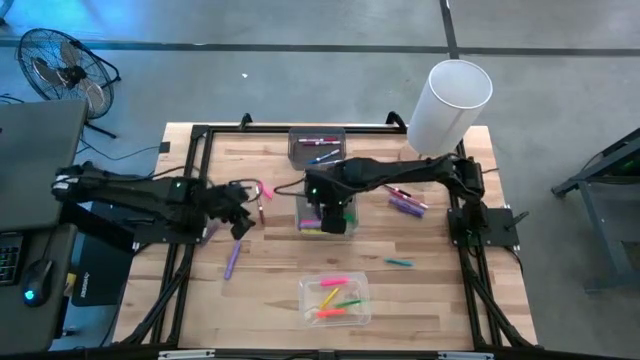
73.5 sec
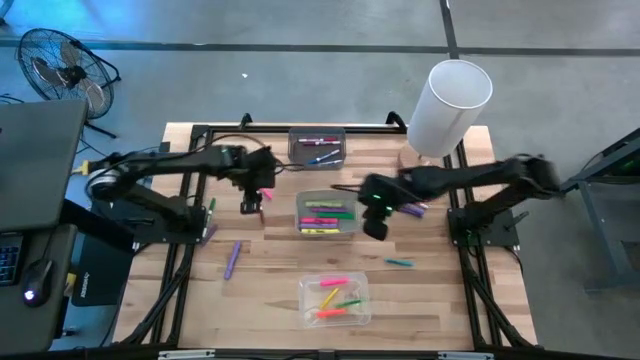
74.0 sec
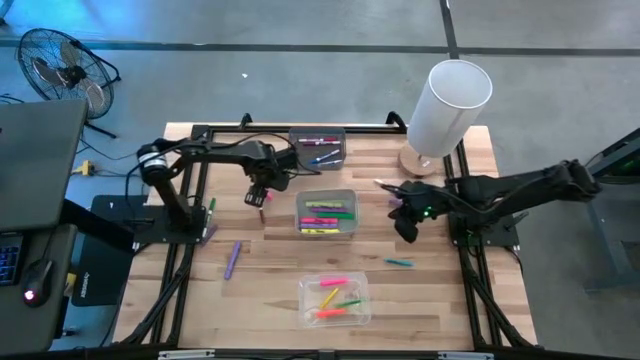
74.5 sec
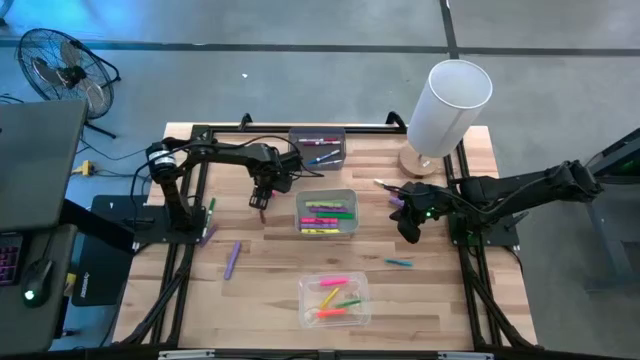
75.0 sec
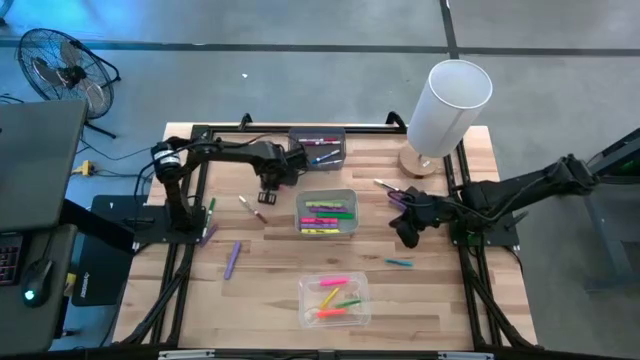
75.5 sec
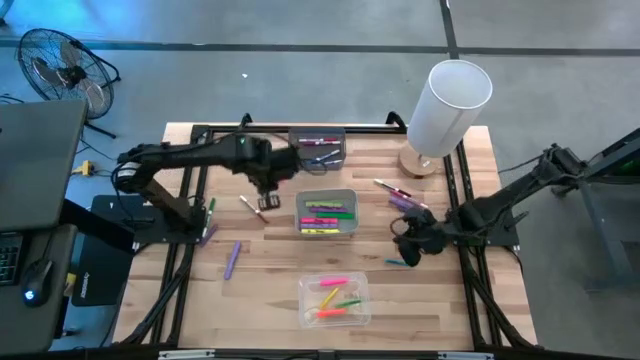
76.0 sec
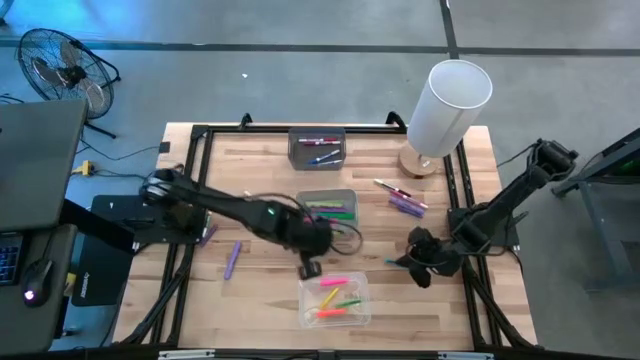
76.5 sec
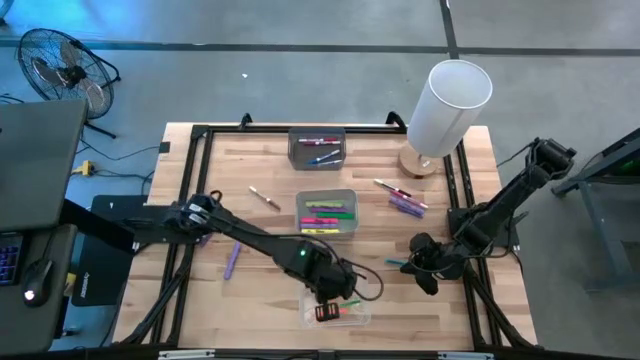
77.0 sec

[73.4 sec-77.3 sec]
Task: Pick & Place Markers
Put the pink pen into the transparent bin

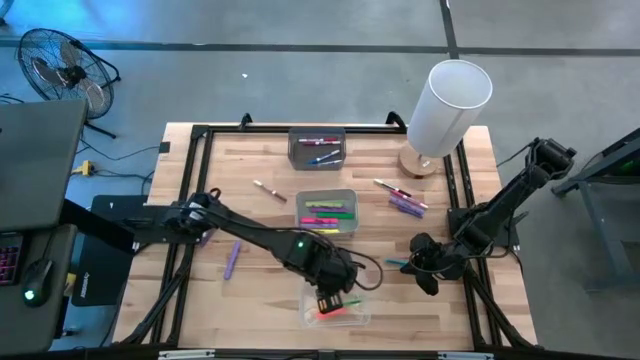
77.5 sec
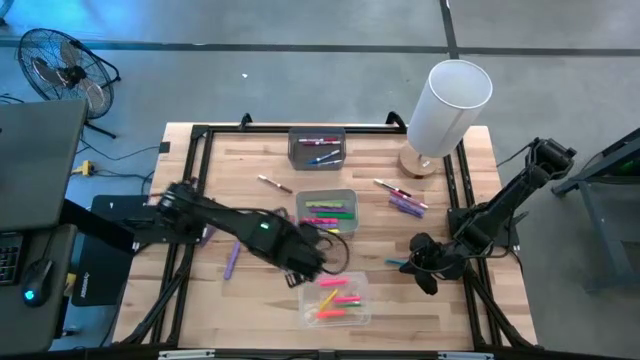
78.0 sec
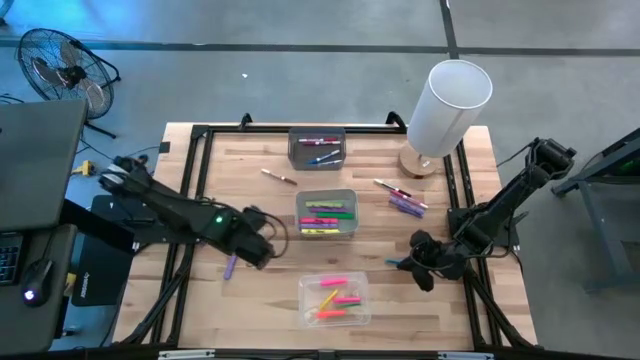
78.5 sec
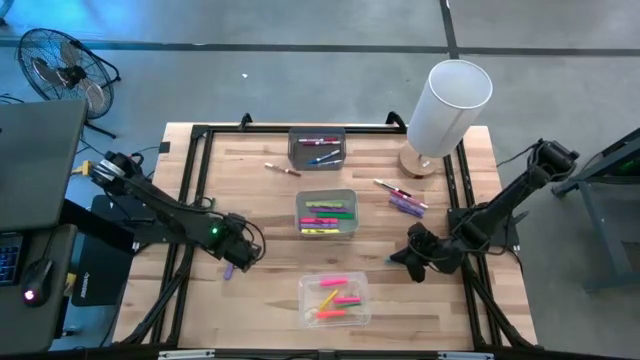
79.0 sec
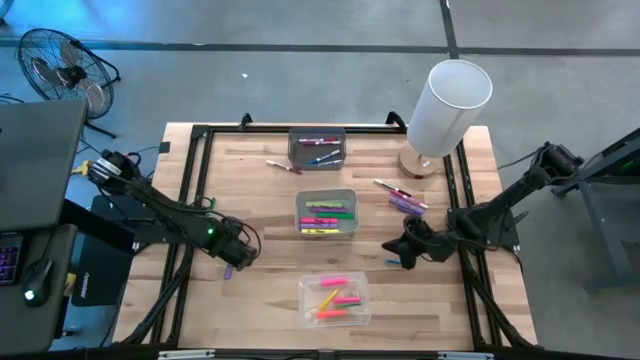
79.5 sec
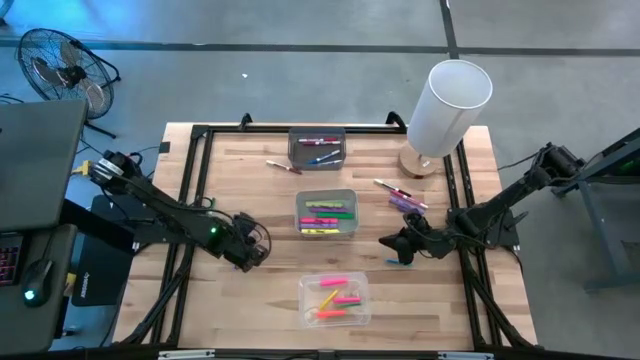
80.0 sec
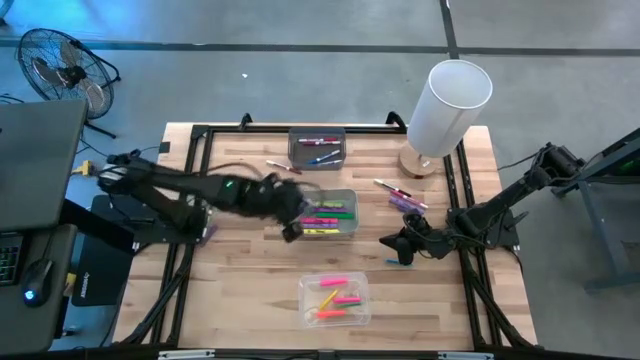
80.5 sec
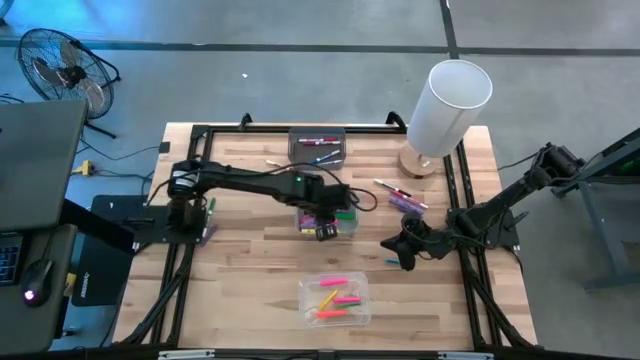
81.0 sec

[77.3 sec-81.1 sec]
Put the purple highlighter pen into the gray bin

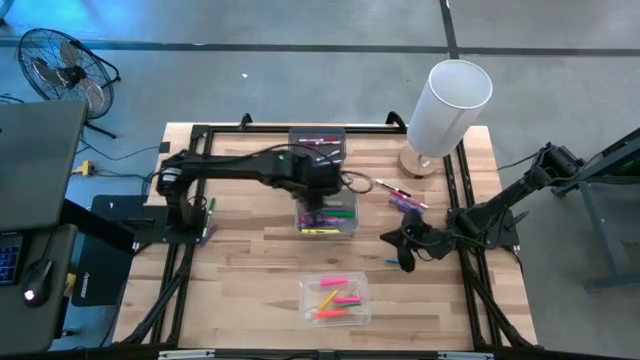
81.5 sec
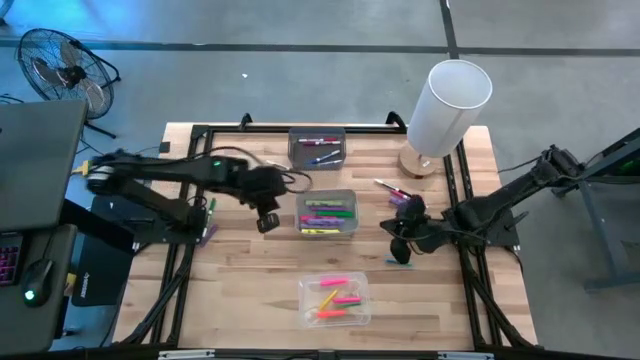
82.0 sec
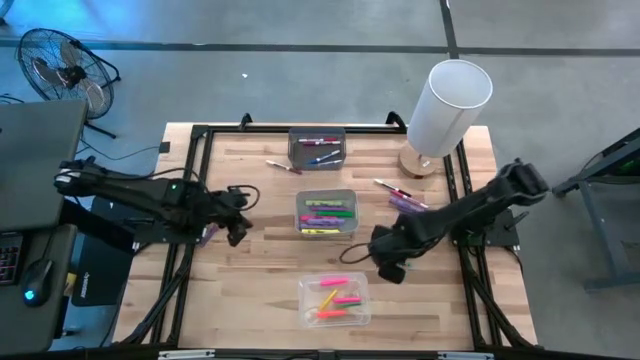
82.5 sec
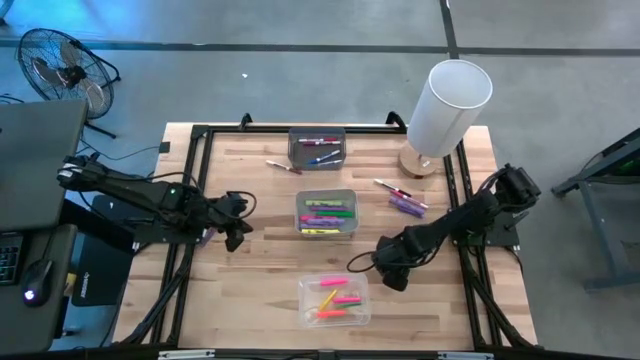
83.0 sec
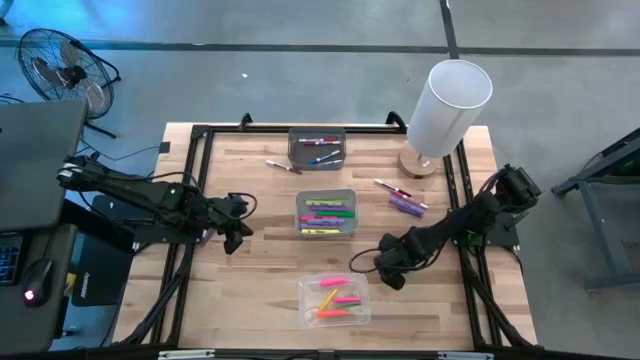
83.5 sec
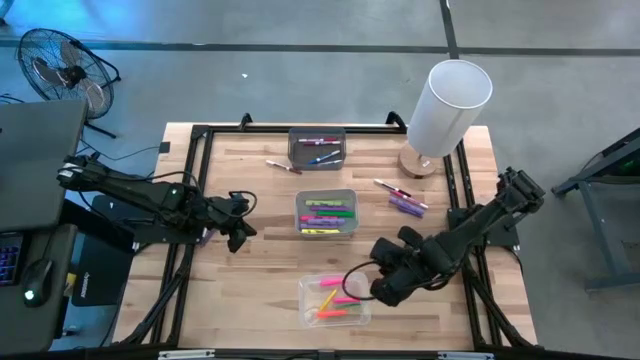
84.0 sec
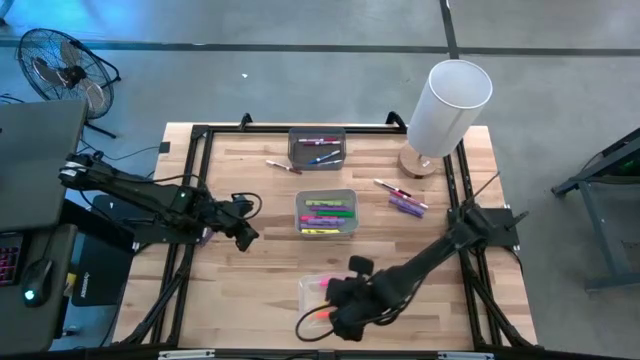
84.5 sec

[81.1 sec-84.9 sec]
Put the blue pen into the transparent bin

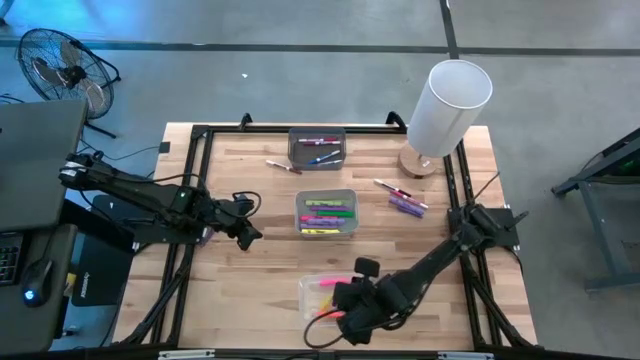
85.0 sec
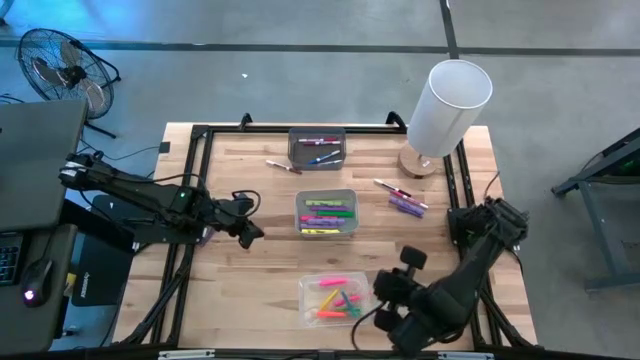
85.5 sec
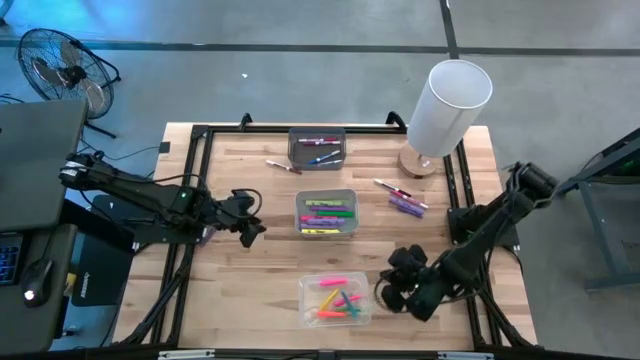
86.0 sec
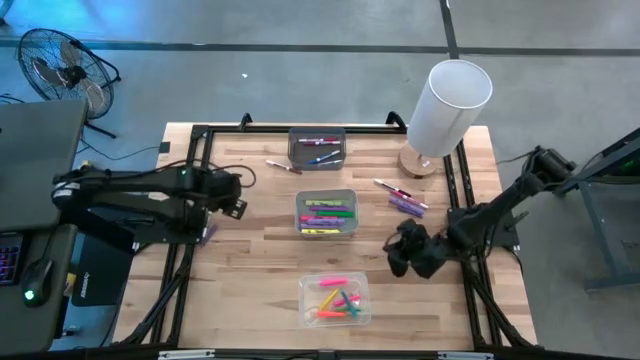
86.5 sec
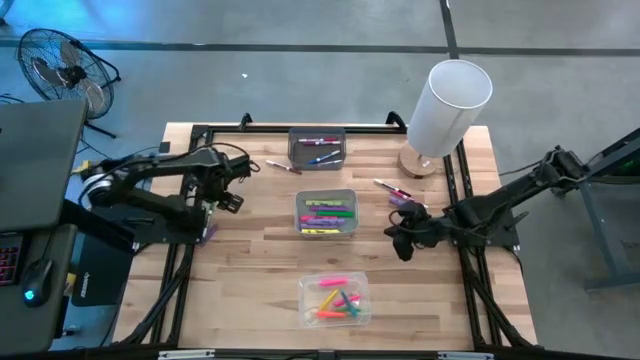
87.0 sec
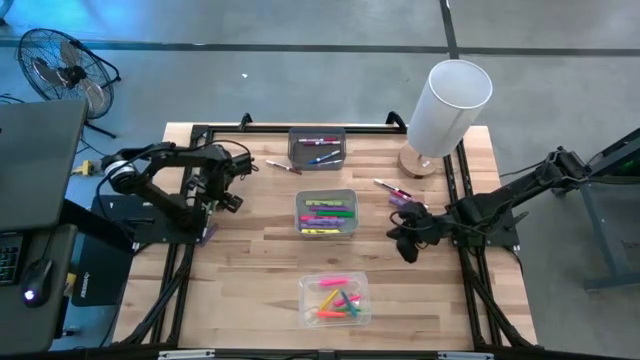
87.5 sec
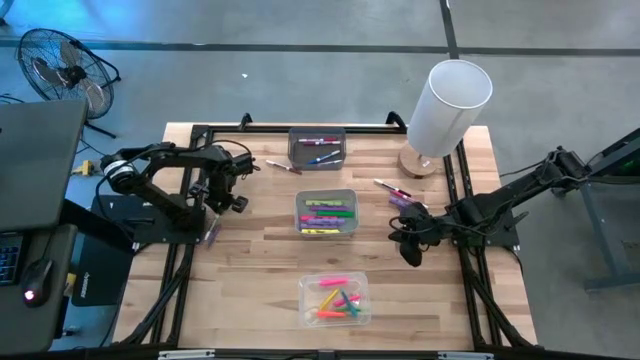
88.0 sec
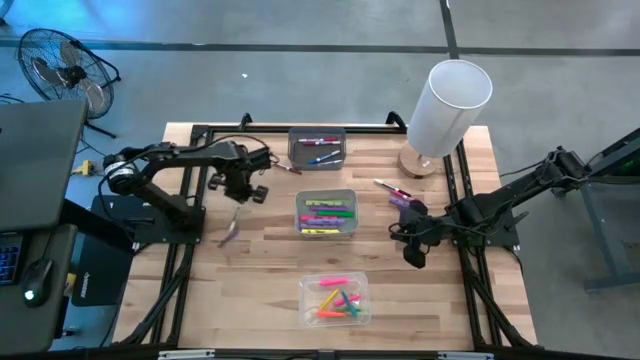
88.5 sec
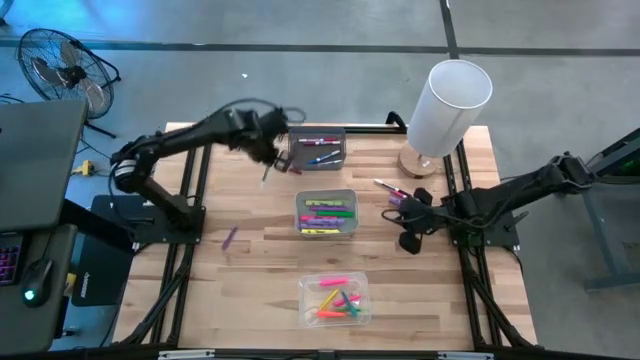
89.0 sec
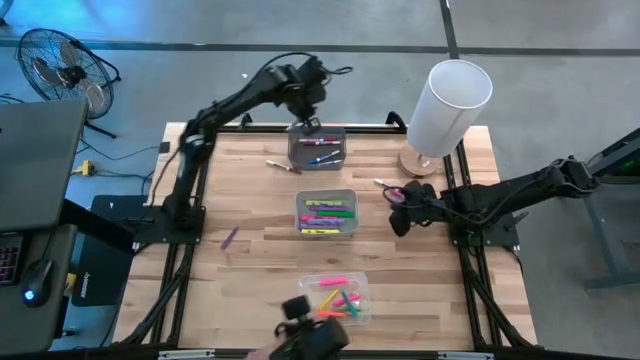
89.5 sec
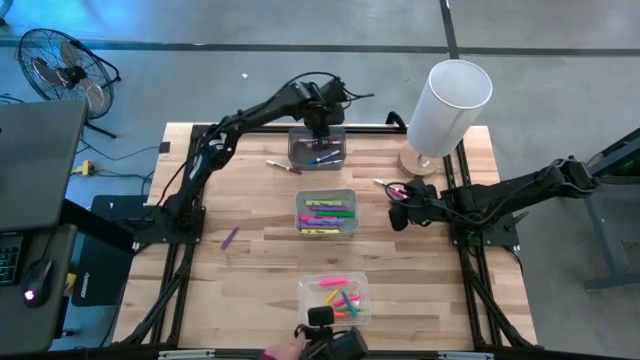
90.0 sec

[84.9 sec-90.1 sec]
Put the green marker pen into the black bin

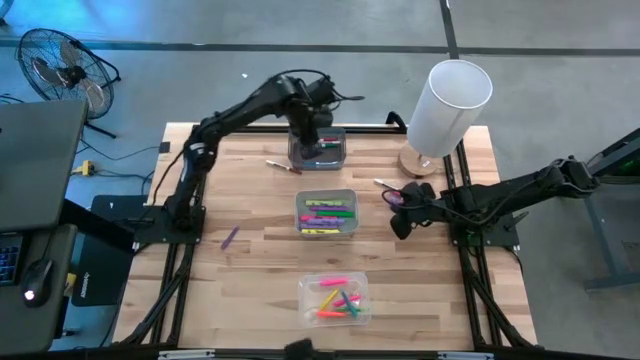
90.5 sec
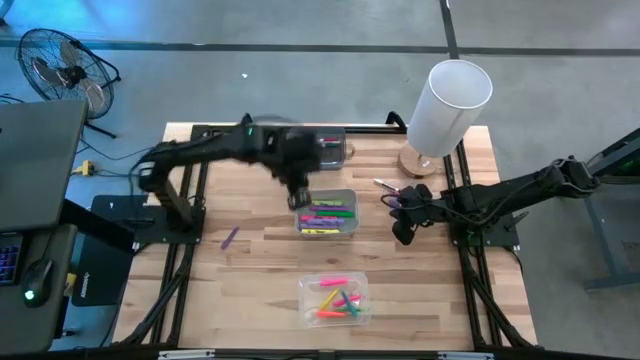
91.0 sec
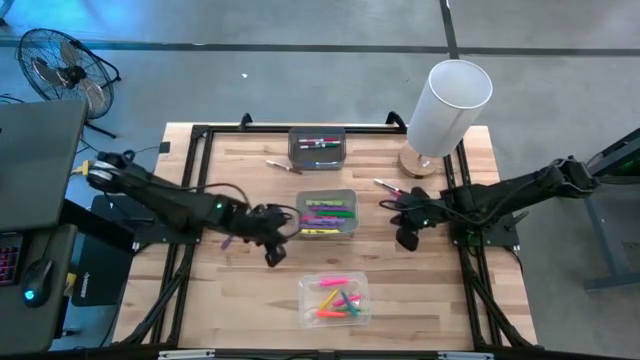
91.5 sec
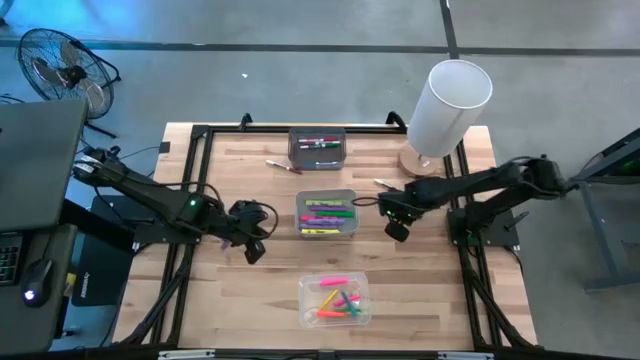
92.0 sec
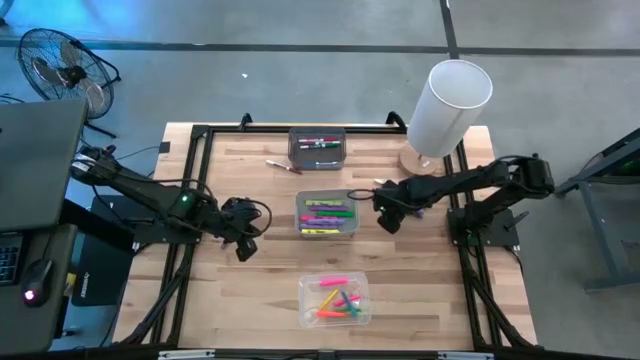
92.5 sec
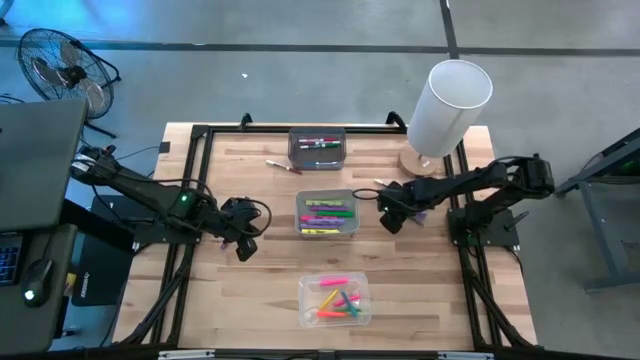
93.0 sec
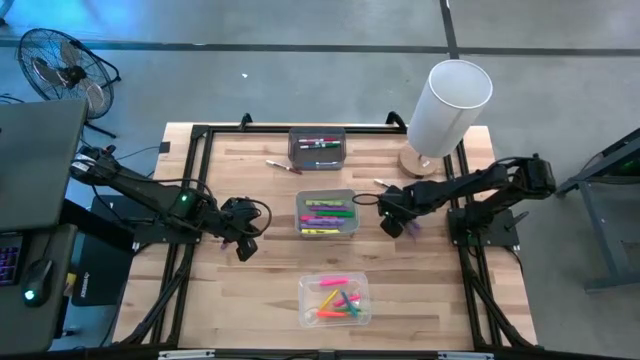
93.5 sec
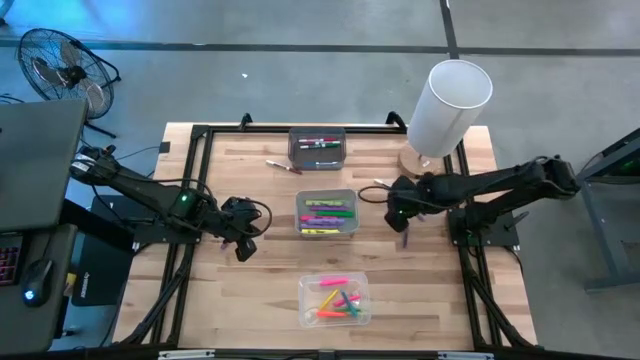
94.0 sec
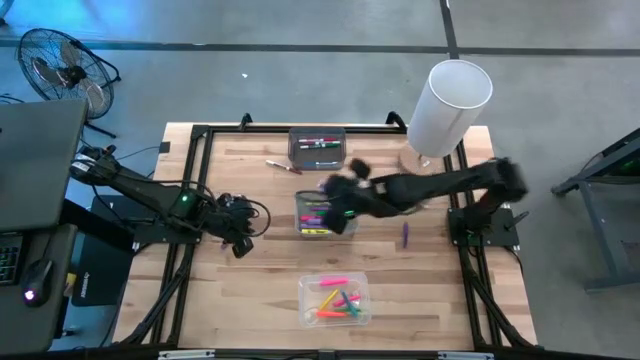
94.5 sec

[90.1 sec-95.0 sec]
Put the purple highlighter pen into the gray bin
